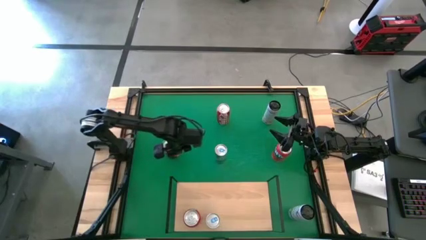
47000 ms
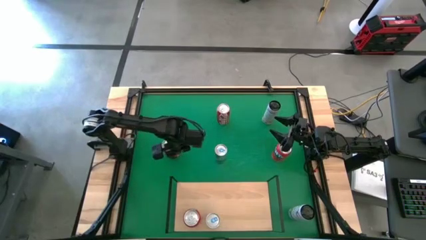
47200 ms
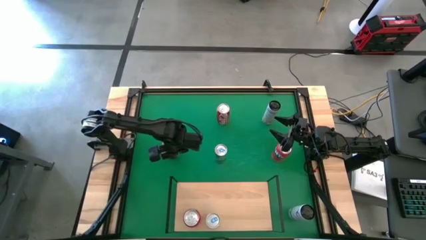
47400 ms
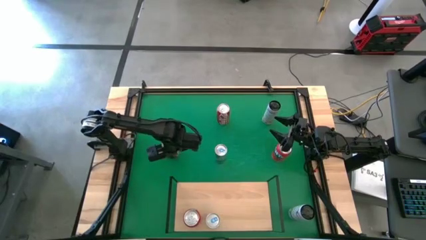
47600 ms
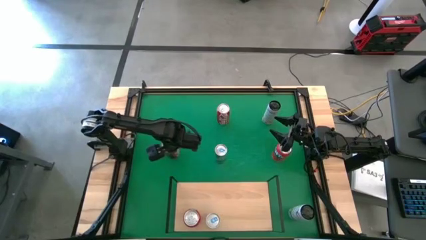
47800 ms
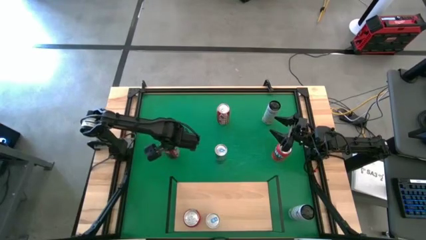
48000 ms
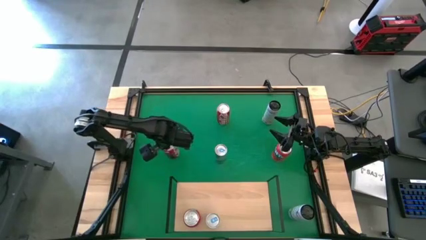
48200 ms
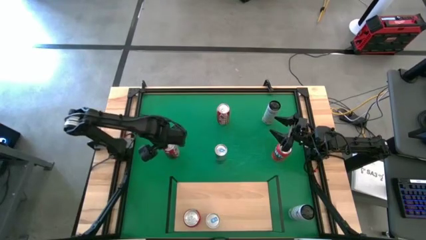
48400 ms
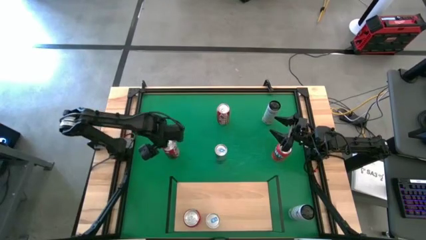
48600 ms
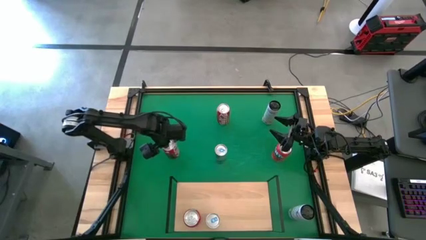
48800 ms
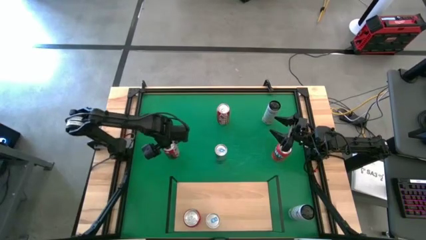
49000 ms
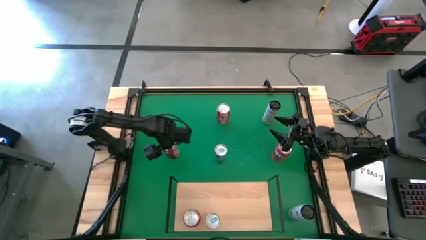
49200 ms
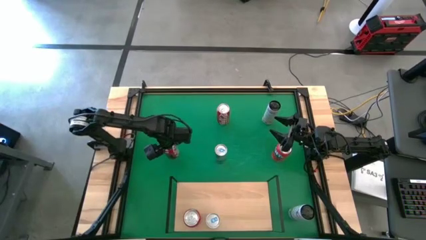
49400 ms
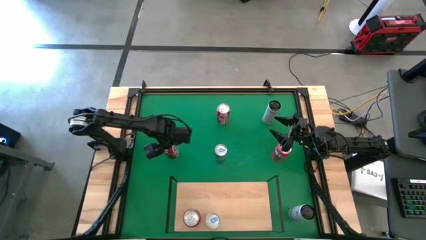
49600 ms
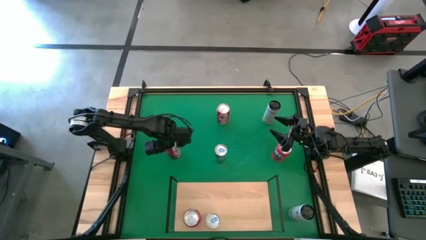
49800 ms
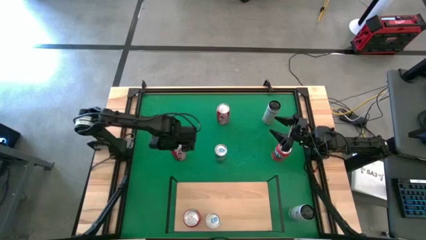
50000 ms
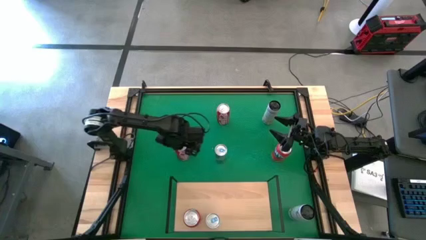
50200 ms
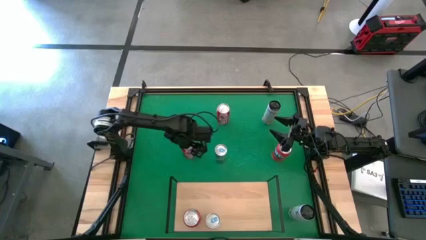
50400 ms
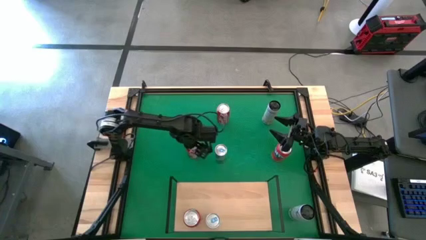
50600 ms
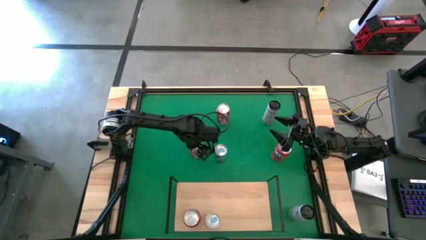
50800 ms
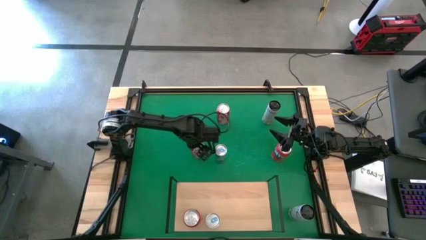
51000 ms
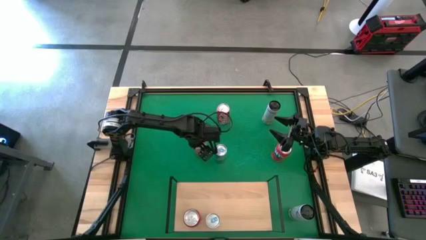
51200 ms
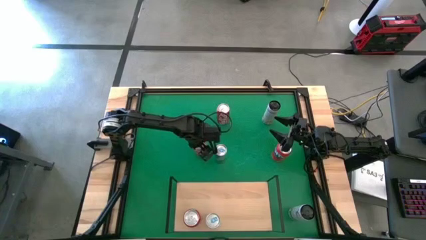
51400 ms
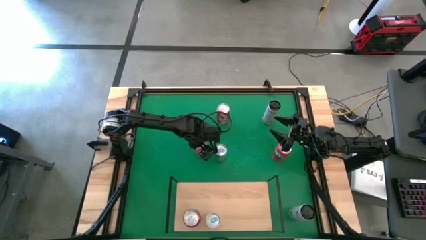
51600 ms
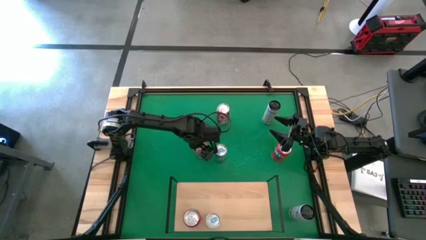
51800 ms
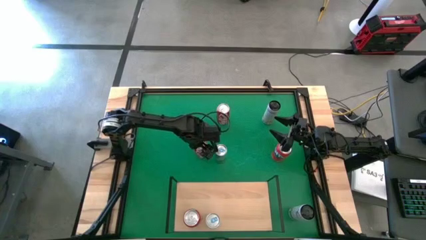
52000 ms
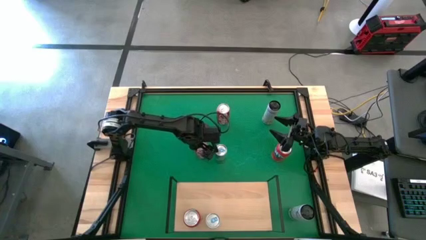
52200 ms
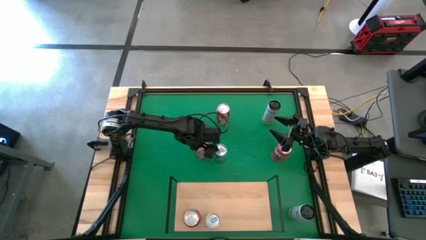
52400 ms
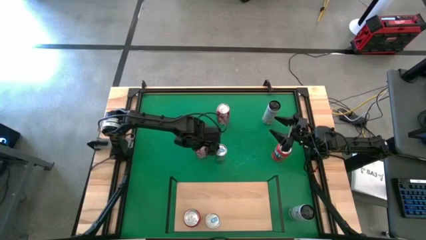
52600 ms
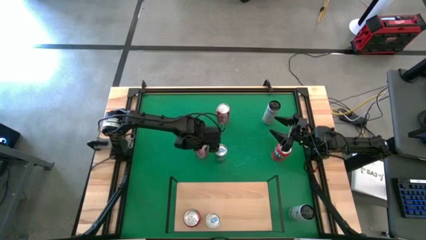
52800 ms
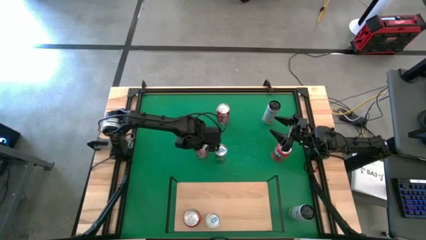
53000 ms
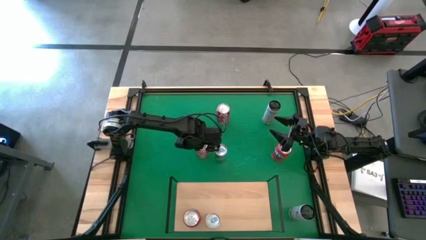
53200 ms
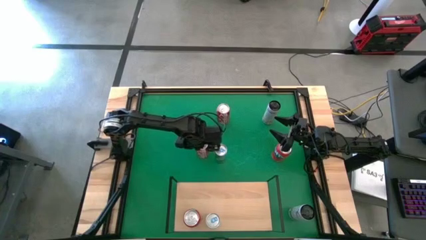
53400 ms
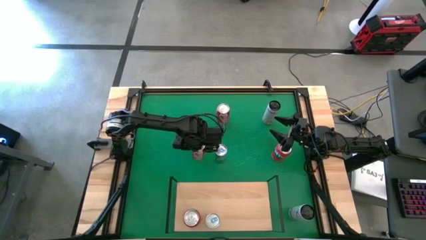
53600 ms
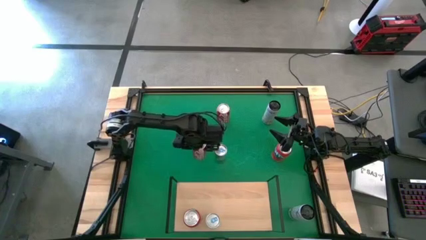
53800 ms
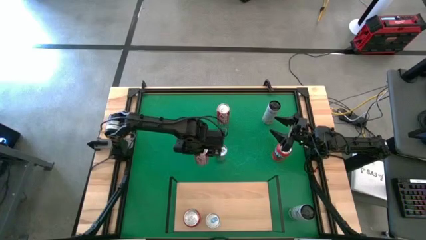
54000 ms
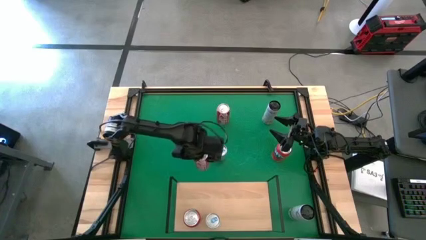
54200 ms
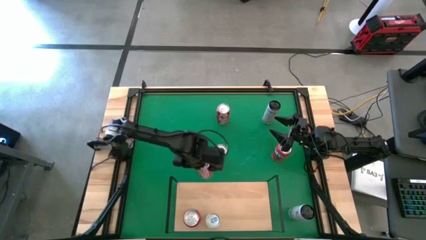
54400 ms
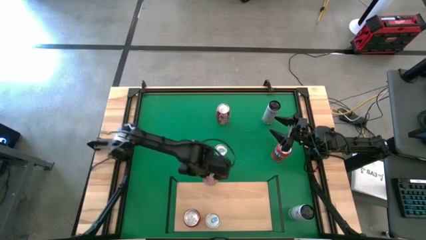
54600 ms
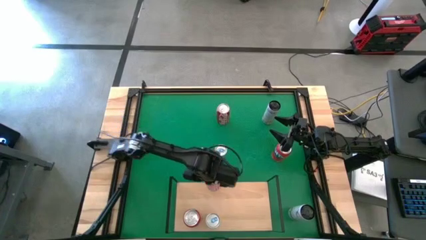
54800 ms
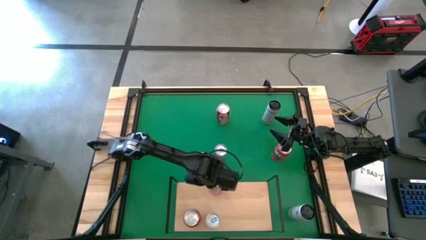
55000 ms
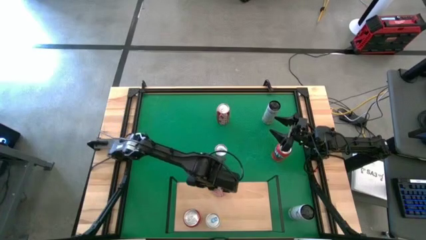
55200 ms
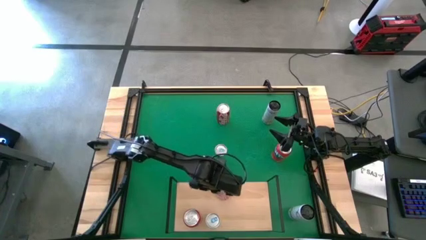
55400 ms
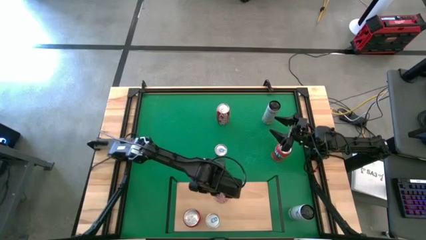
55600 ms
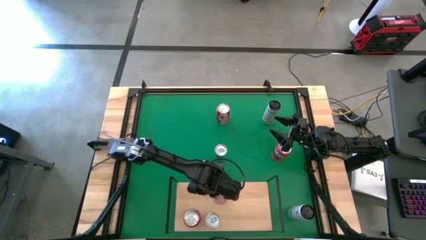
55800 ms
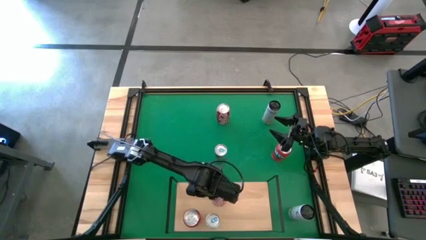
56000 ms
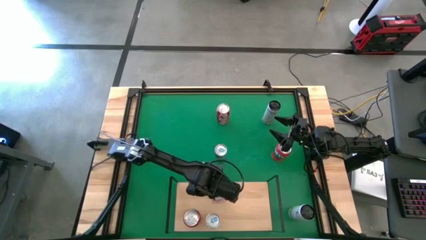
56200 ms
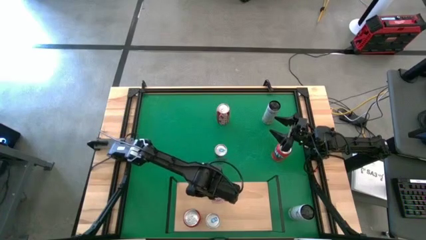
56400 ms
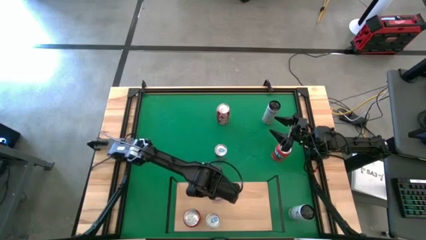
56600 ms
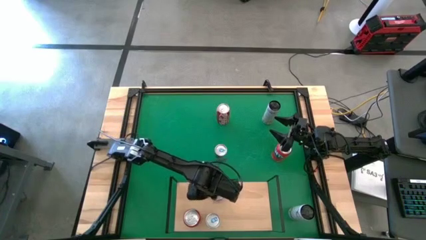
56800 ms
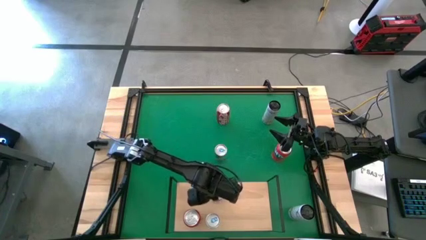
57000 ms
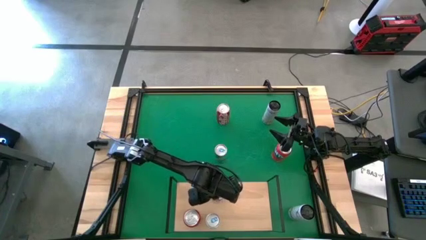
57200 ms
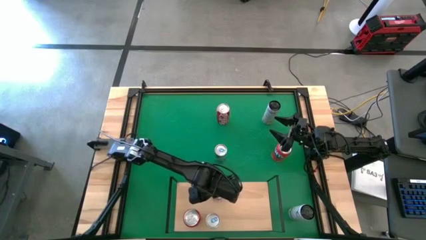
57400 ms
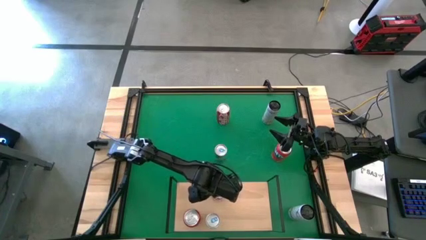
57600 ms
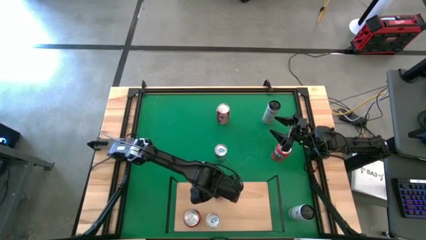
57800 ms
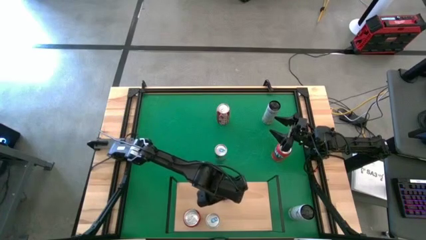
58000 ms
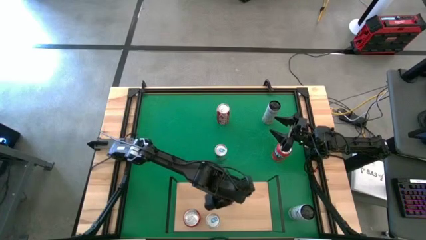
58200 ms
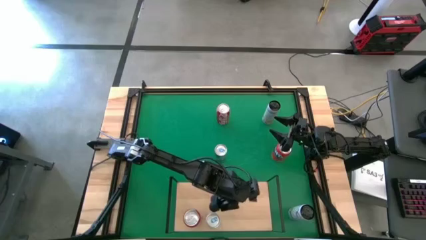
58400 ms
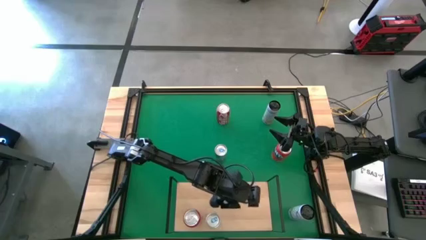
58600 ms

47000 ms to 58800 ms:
Task: Place canned beverage on shelf
Put the bottom red soda can on the shelf
